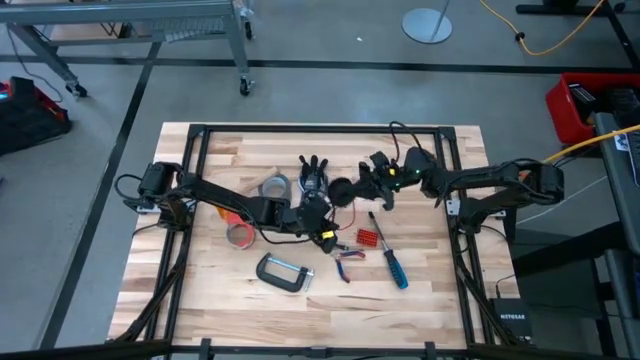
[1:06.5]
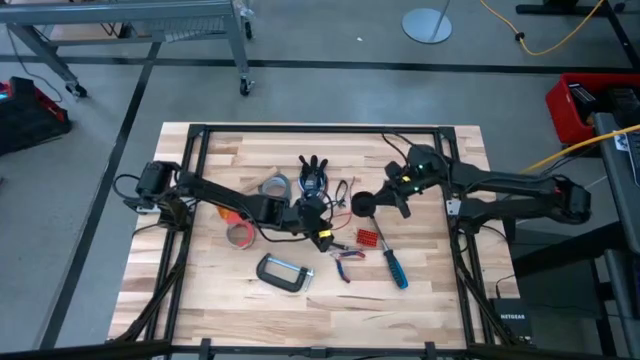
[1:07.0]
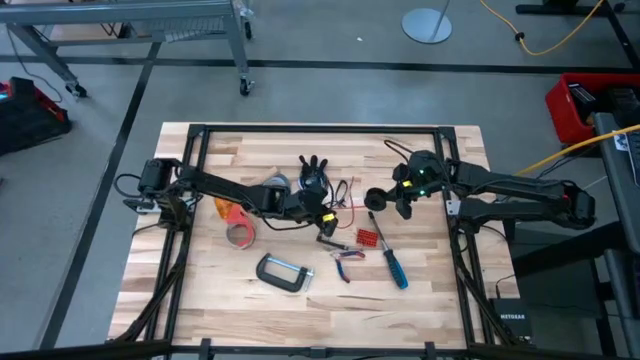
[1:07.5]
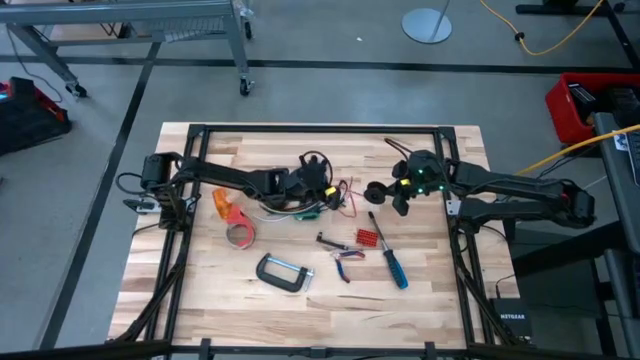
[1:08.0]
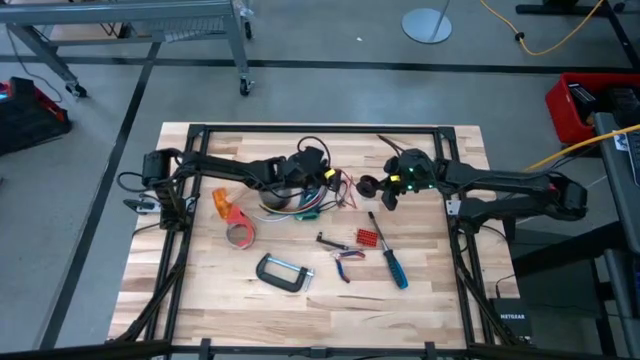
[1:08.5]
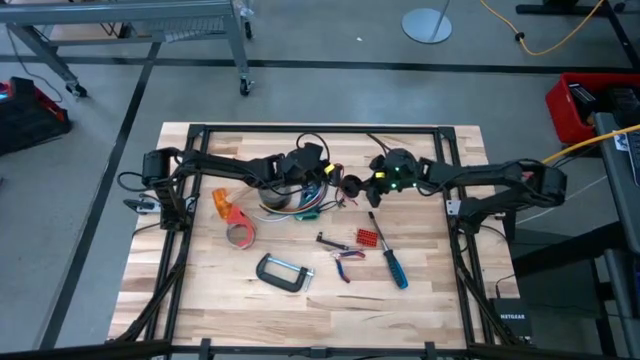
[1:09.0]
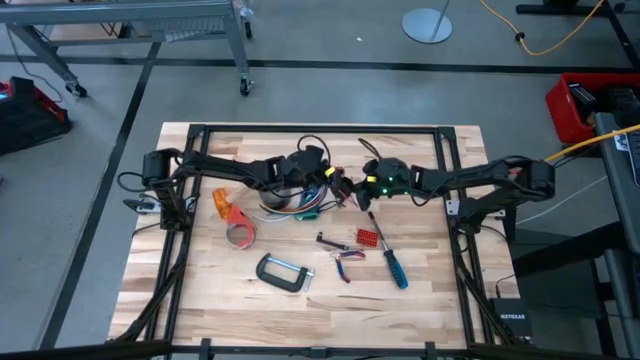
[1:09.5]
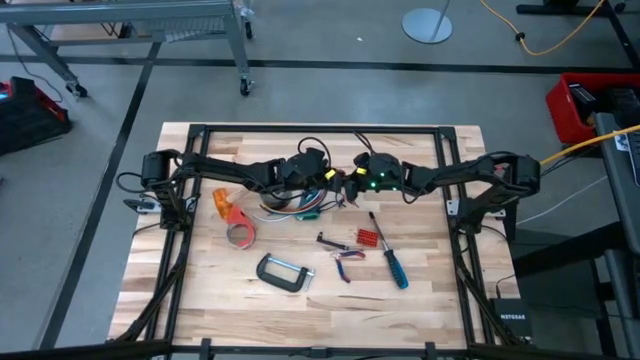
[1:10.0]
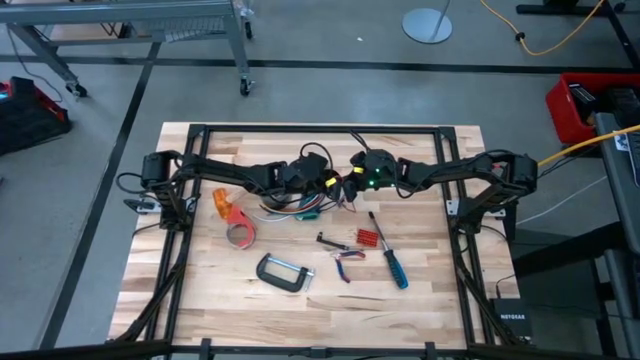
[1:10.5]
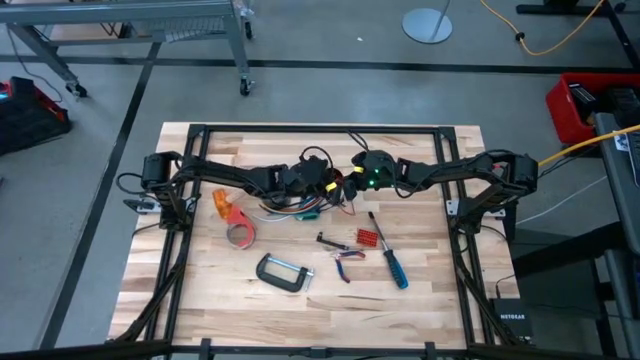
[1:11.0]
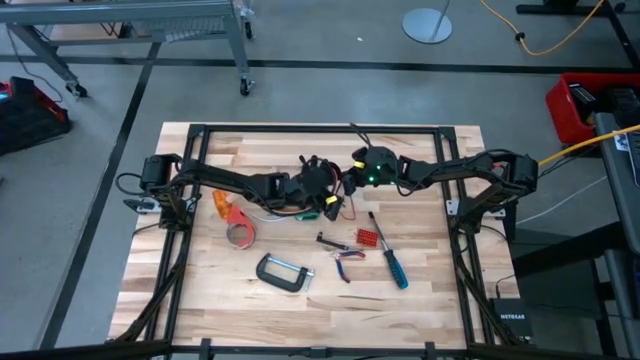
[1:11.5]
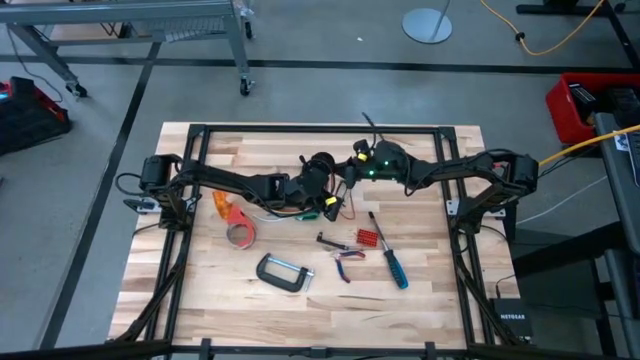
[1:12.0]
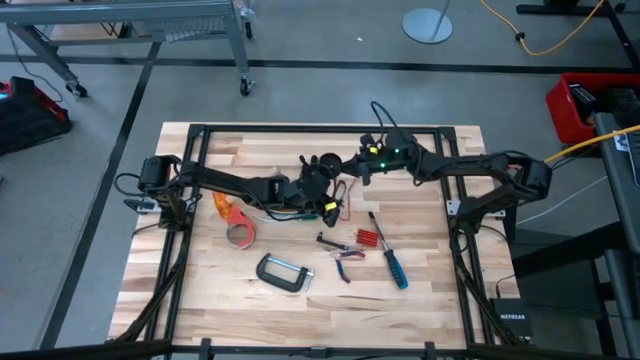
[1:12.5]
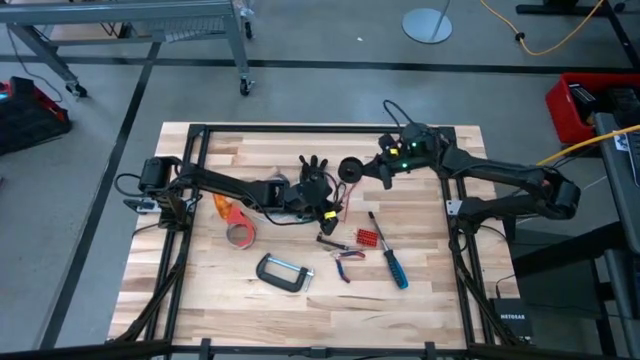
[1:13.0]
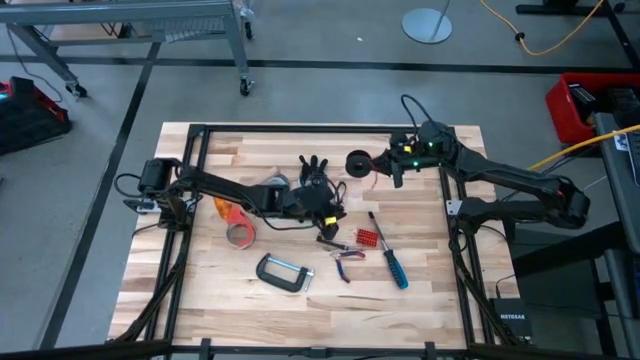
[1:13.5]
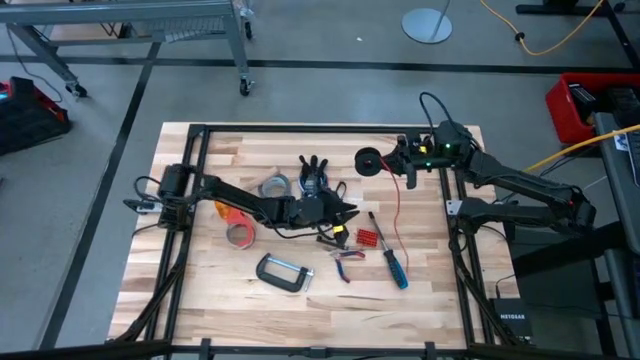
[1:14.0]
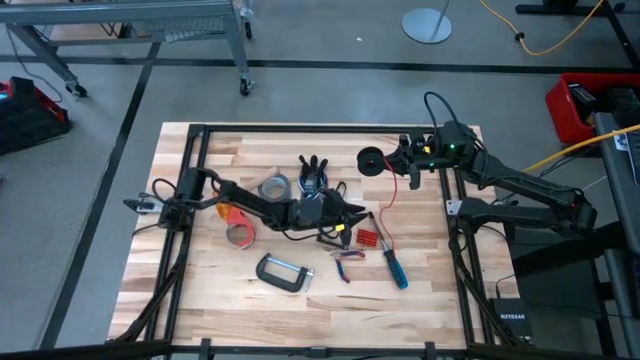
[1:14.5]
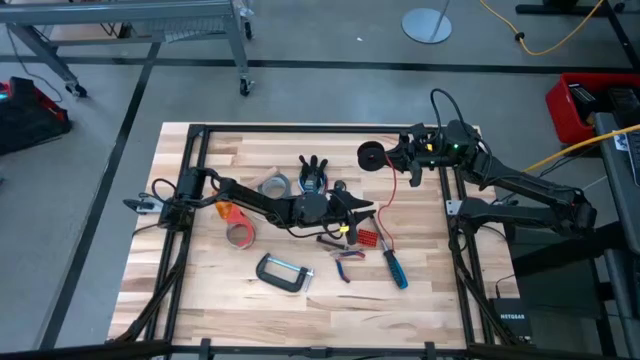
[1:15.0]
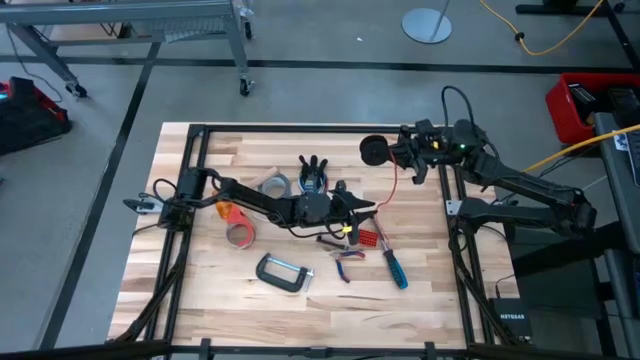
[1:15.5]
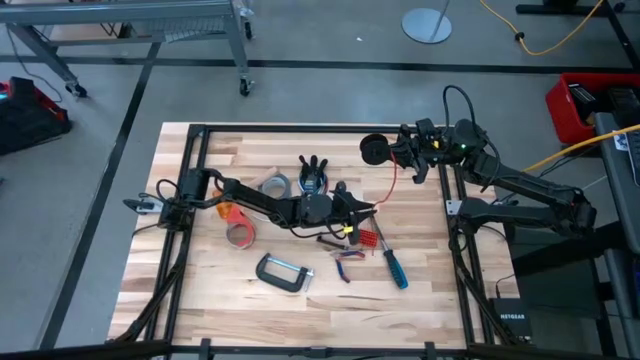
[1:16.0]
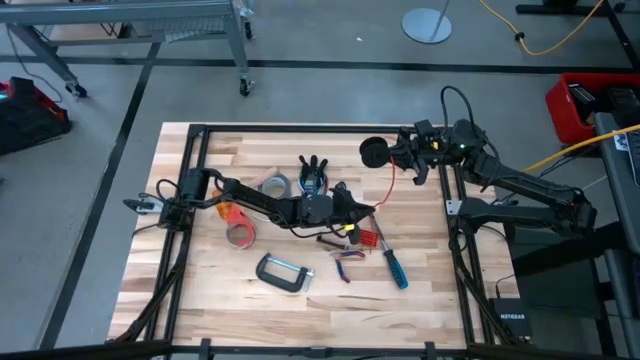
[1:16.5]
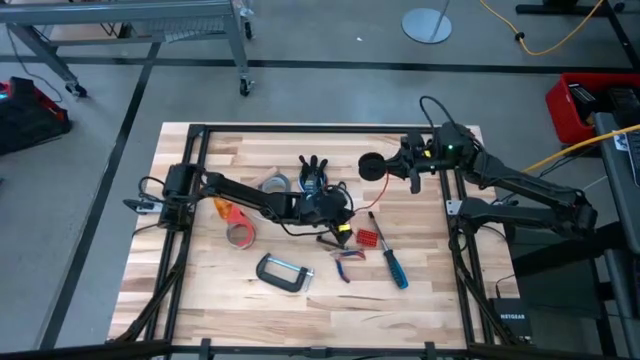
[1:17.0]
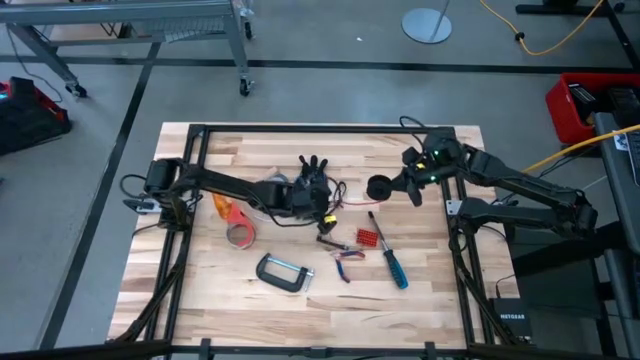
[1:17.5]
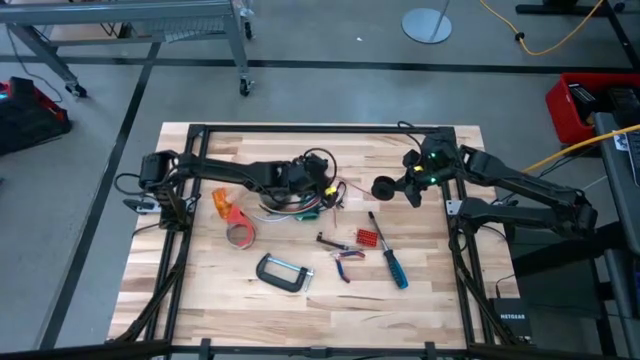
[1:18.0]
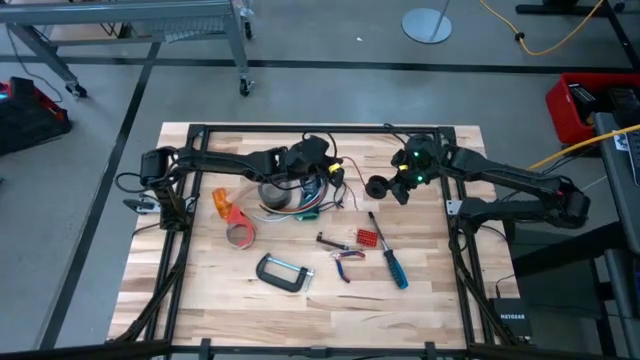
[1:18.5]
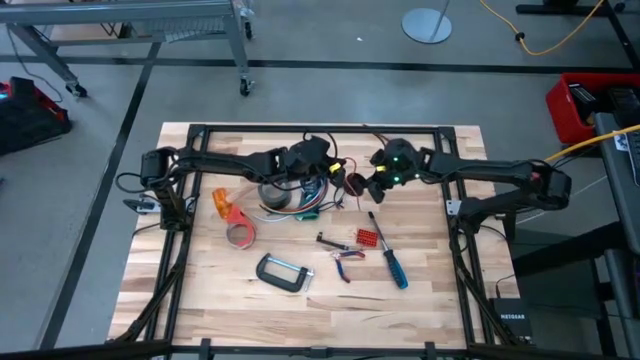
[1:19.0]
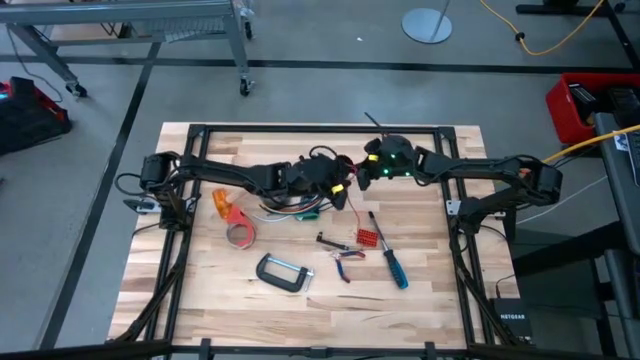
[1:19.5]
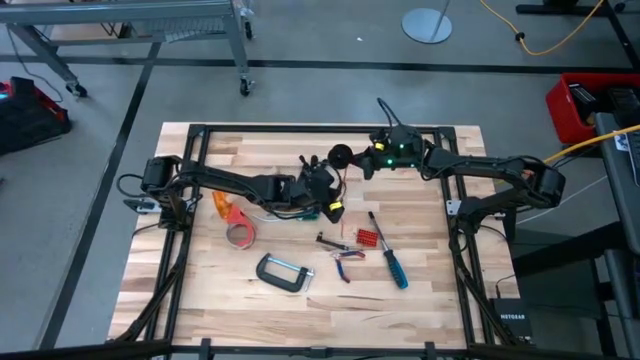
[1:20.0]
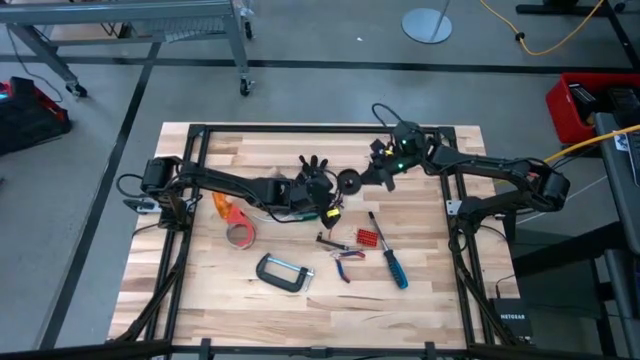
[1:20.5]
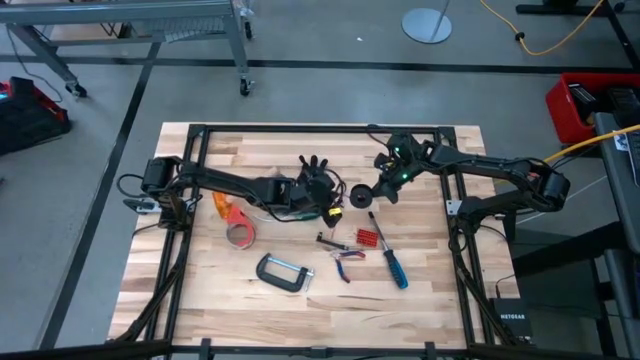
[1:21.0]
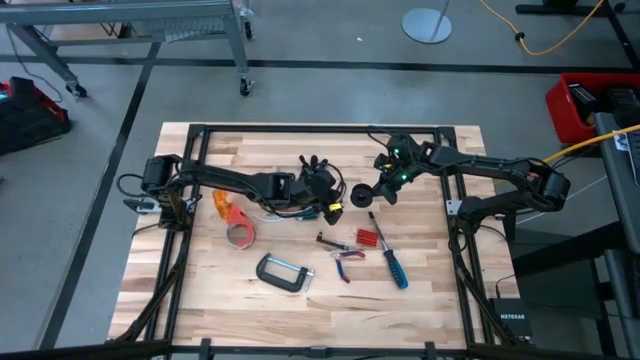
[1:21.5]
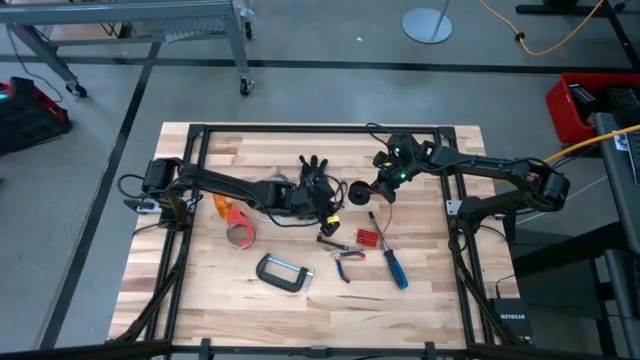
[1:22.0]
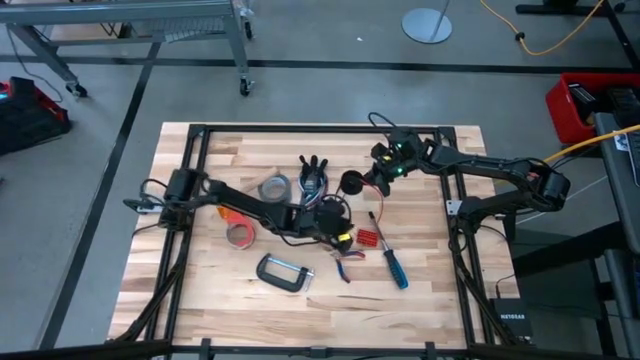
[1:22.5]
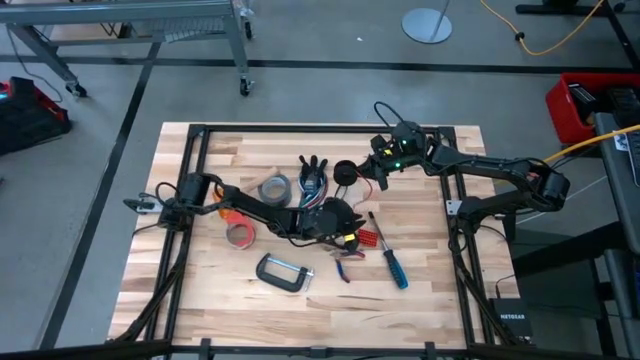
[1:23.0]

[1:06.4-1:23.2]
Task: Coil cords
Coil the red wire onto a black spool

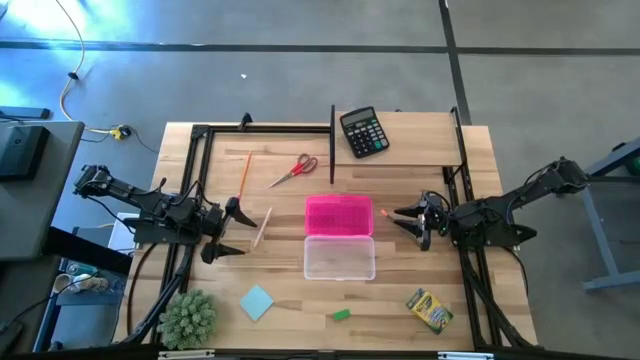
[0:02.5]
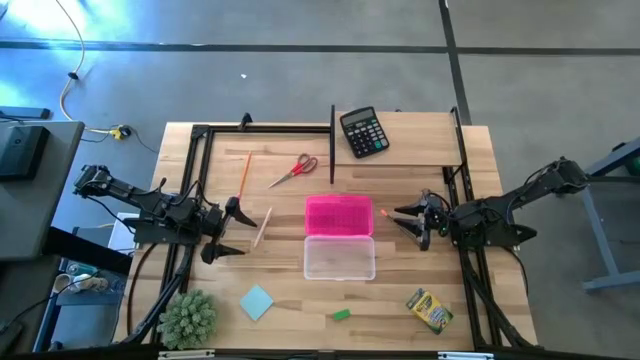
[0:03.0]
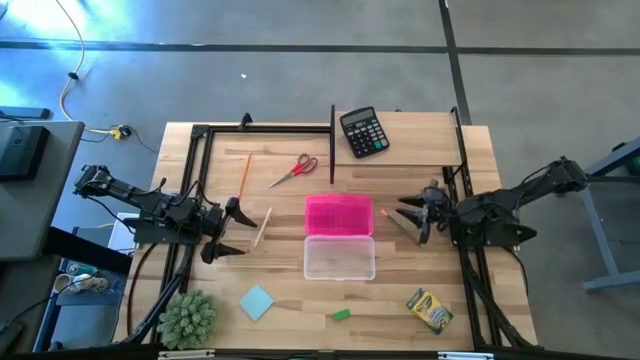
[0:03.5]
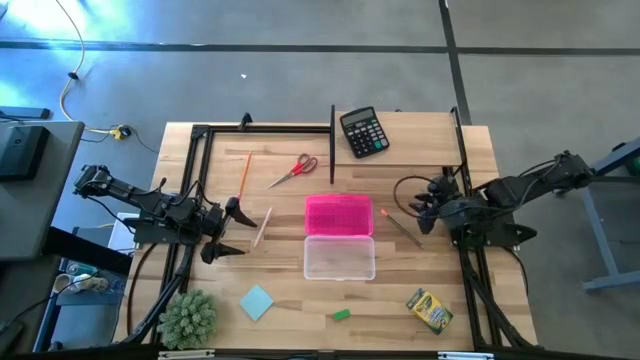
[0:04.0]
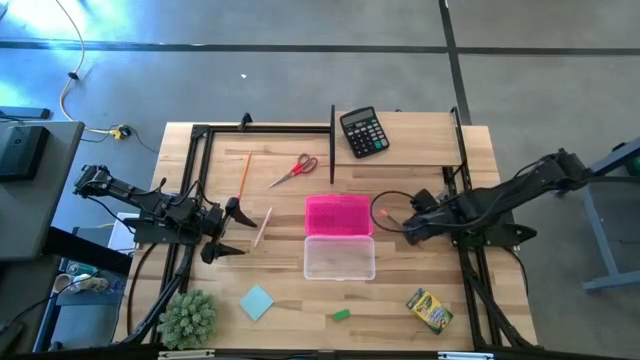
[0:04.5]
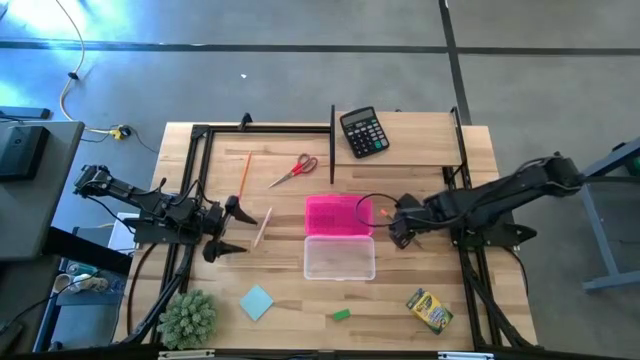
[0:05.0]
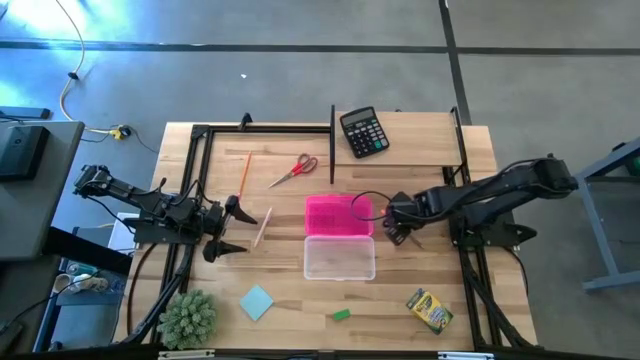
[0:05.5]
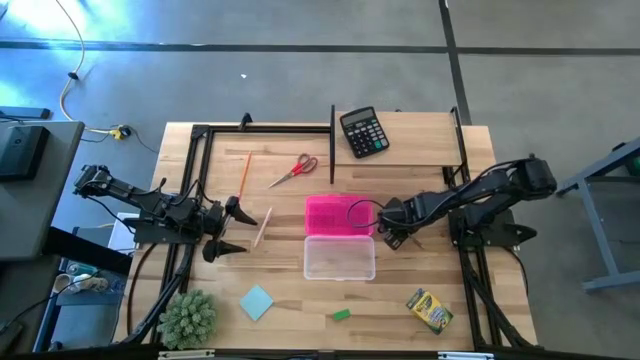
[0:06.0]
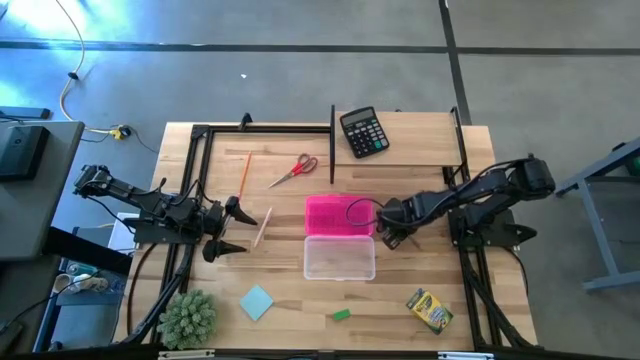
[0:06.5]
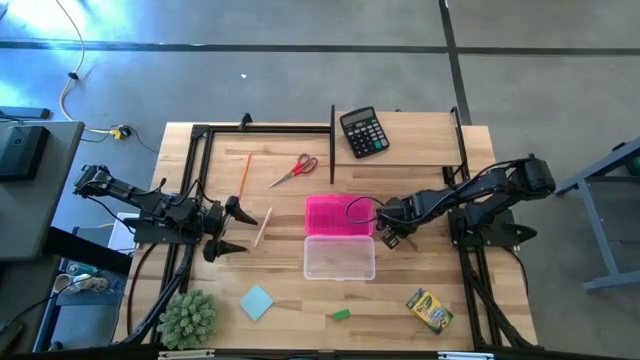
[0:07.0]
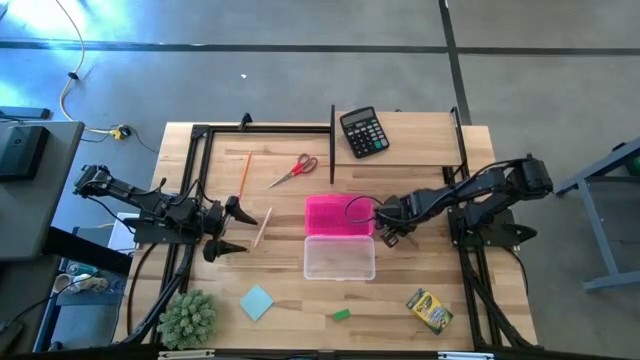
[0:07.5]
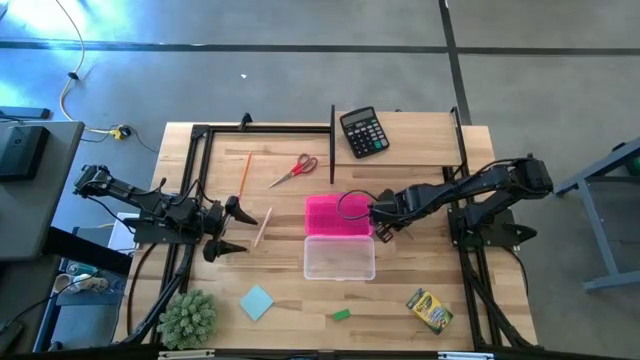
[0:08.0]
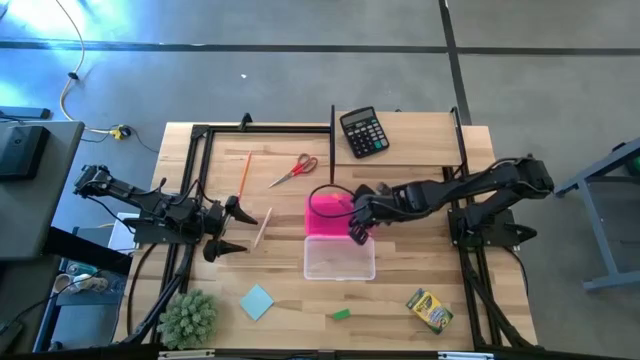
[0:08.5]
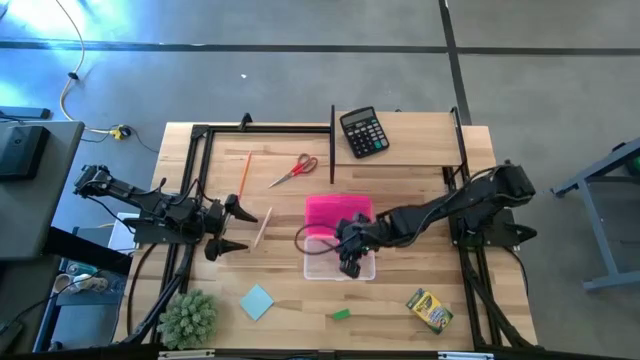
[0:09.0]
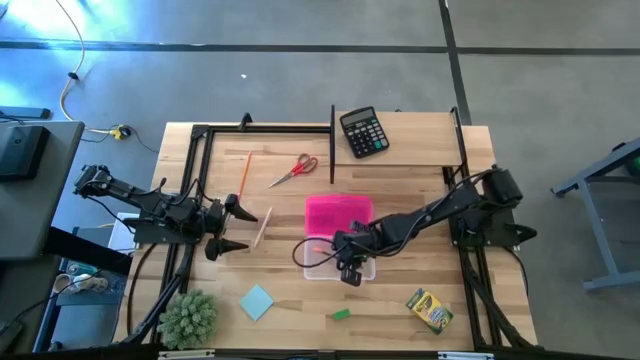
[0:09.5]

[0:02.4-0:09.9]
Task: Pack school essentials
Put the black pencil into the supply box
